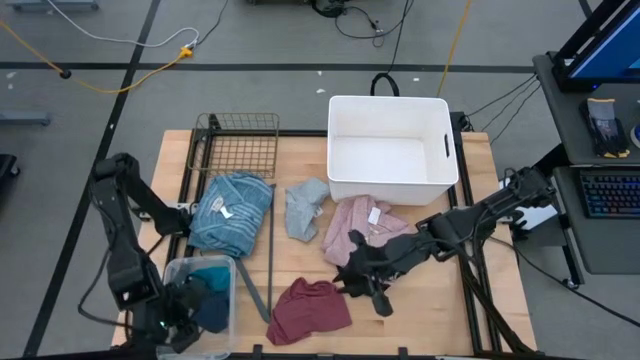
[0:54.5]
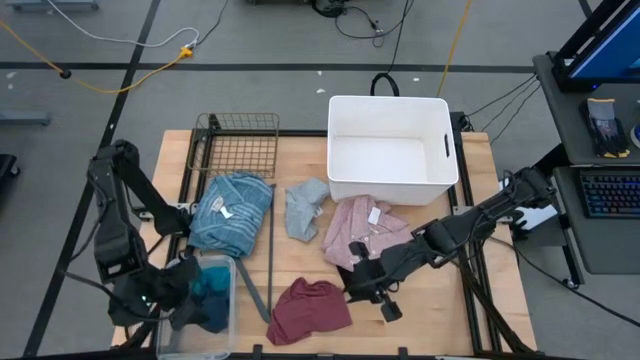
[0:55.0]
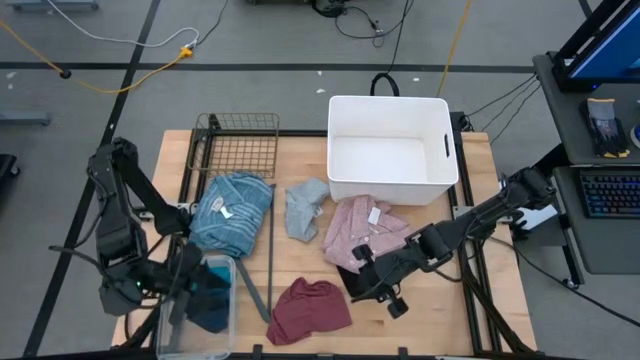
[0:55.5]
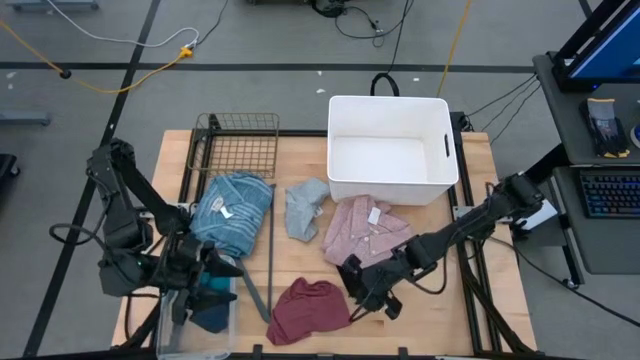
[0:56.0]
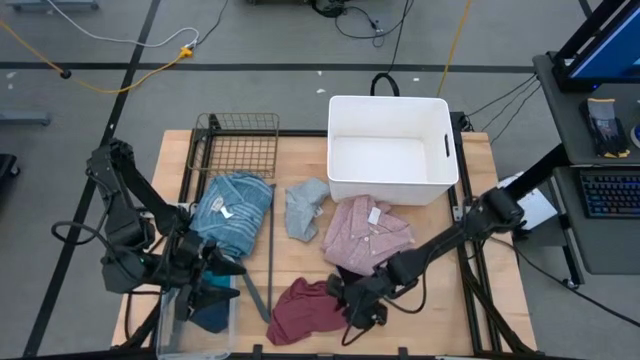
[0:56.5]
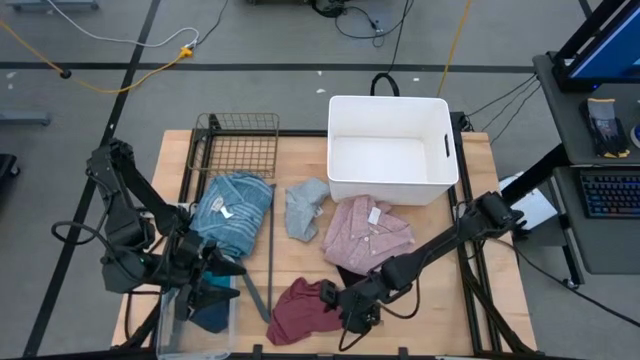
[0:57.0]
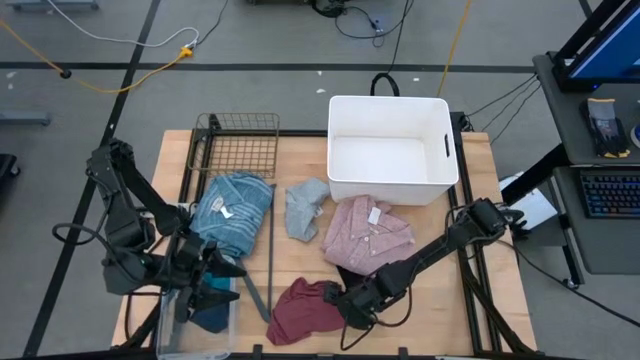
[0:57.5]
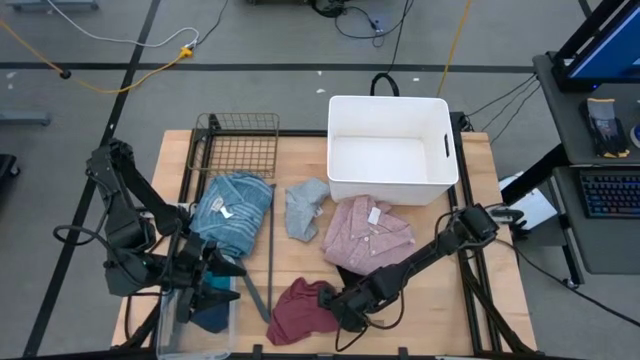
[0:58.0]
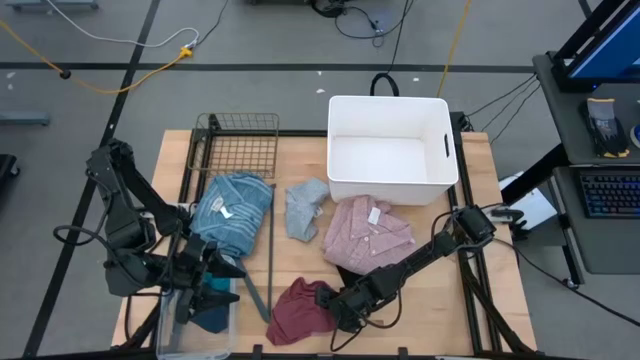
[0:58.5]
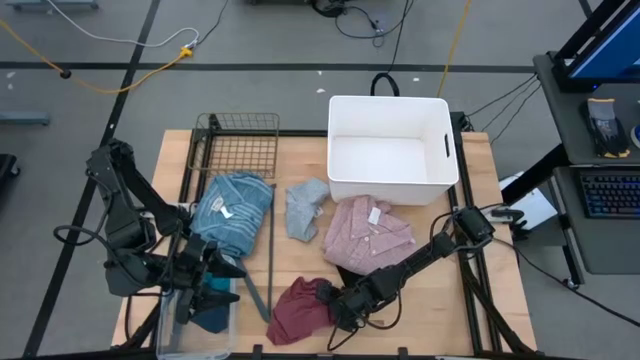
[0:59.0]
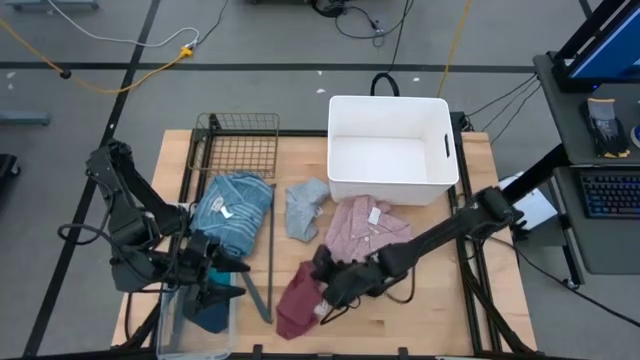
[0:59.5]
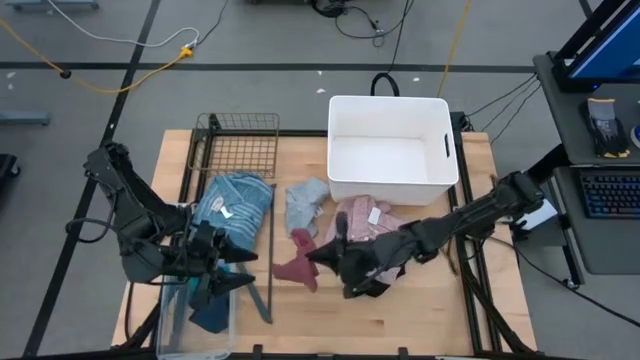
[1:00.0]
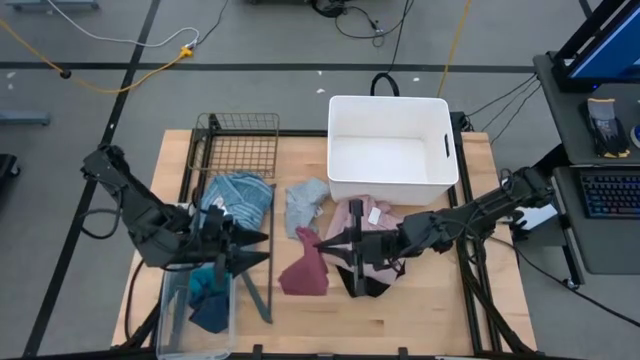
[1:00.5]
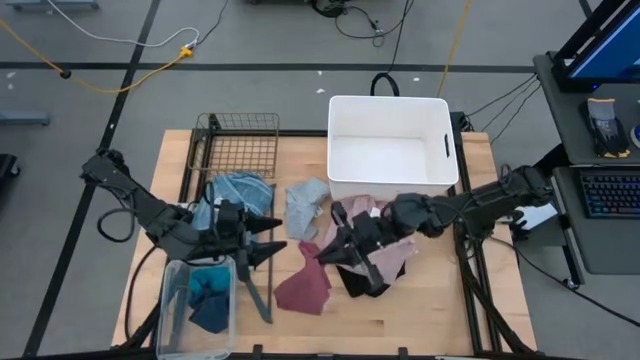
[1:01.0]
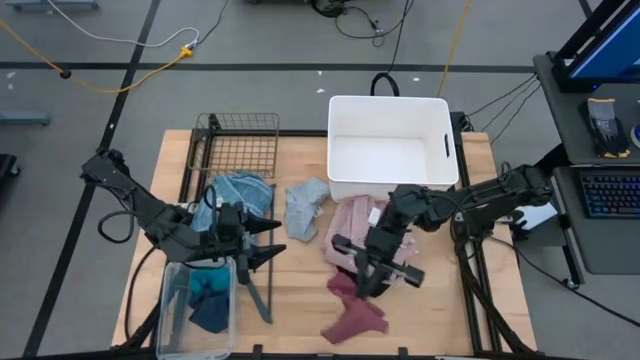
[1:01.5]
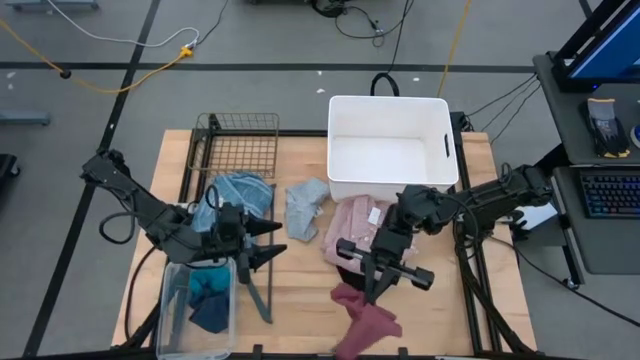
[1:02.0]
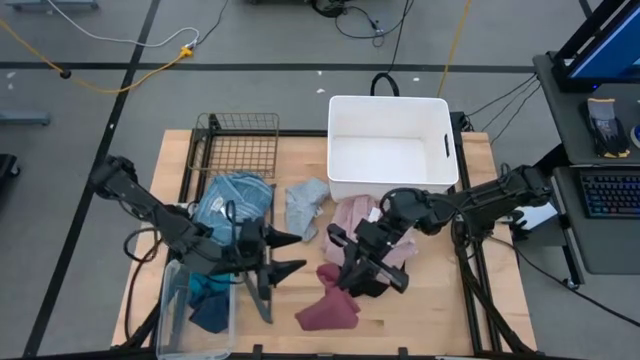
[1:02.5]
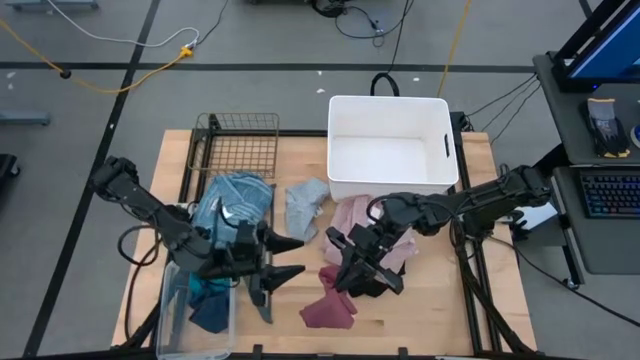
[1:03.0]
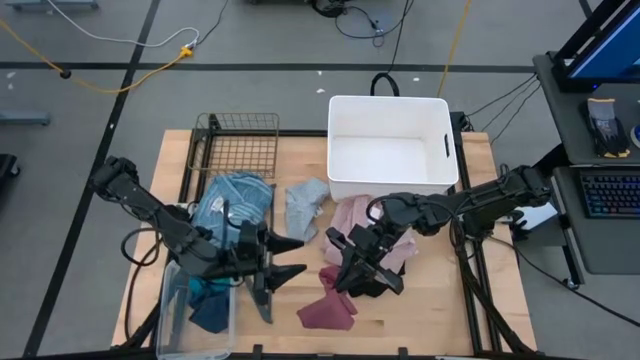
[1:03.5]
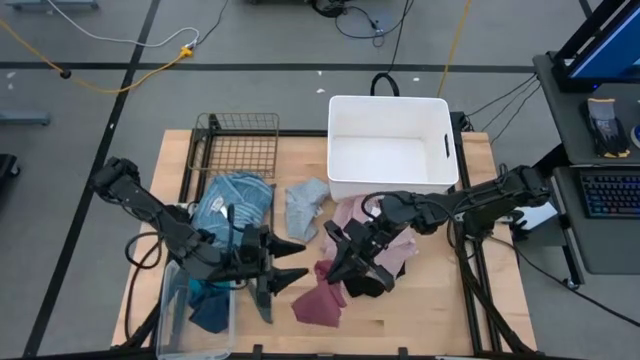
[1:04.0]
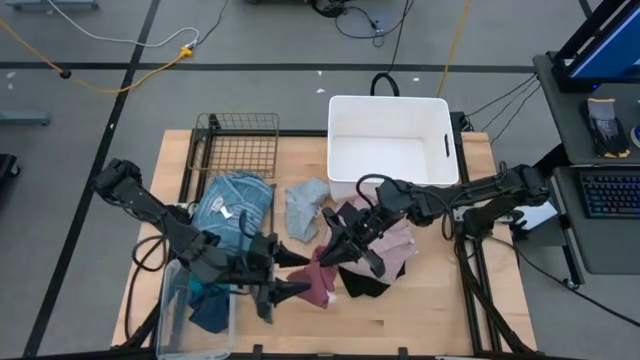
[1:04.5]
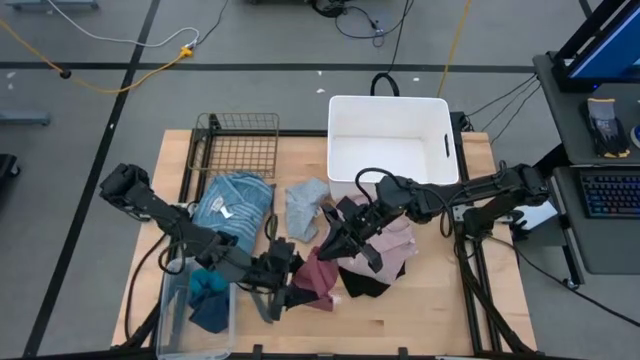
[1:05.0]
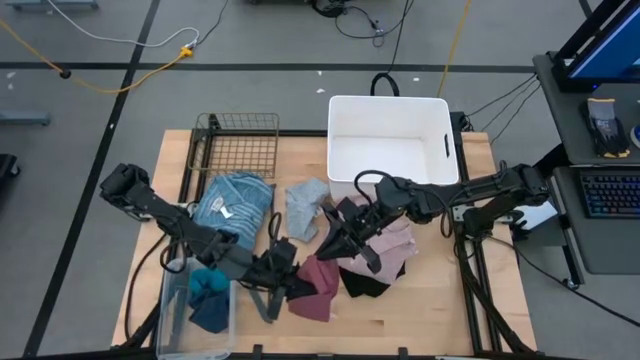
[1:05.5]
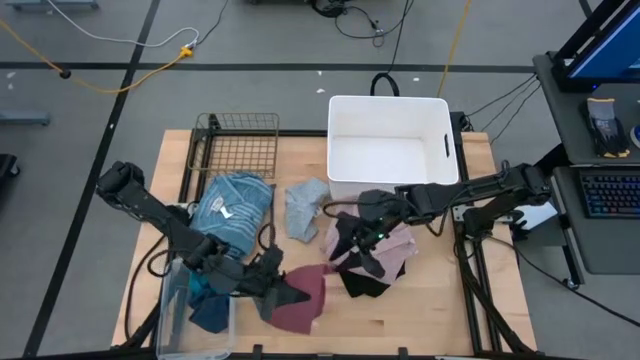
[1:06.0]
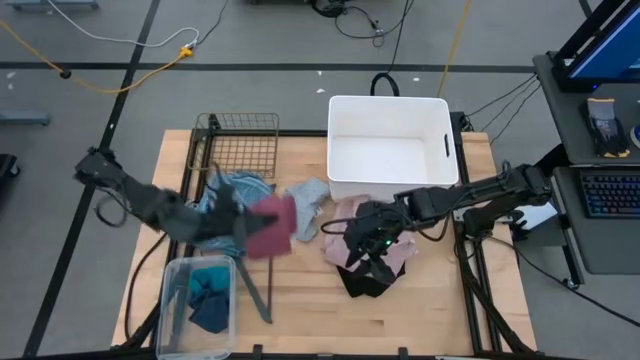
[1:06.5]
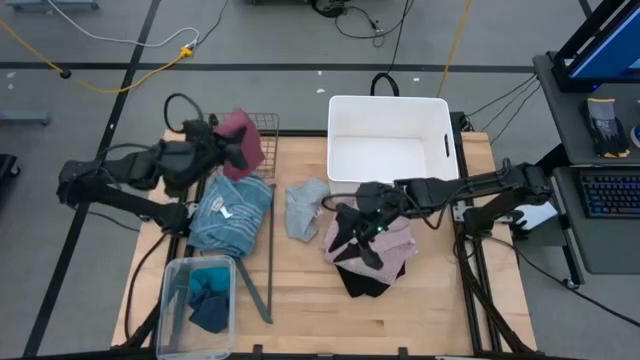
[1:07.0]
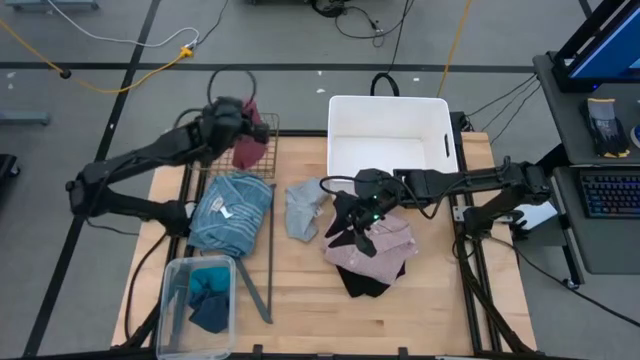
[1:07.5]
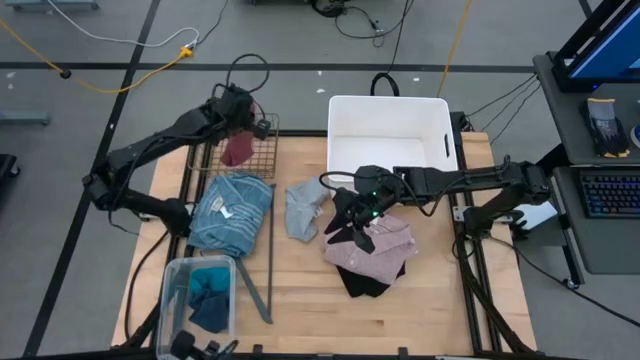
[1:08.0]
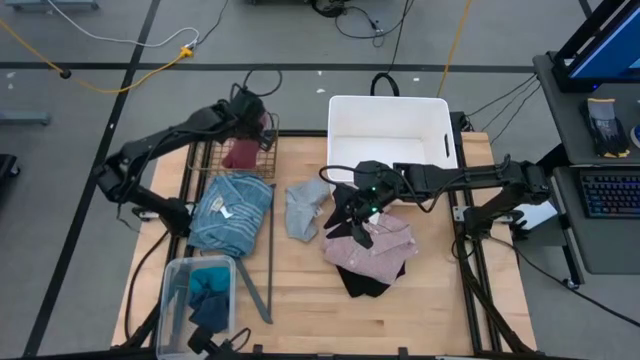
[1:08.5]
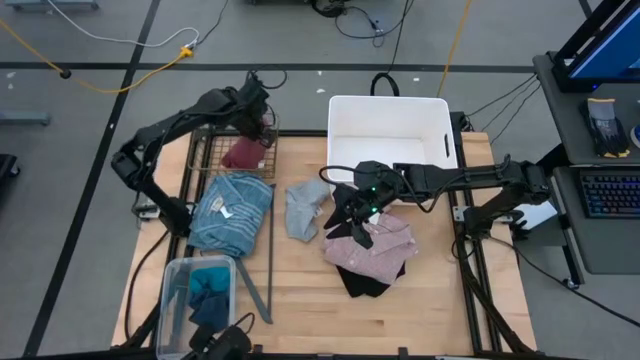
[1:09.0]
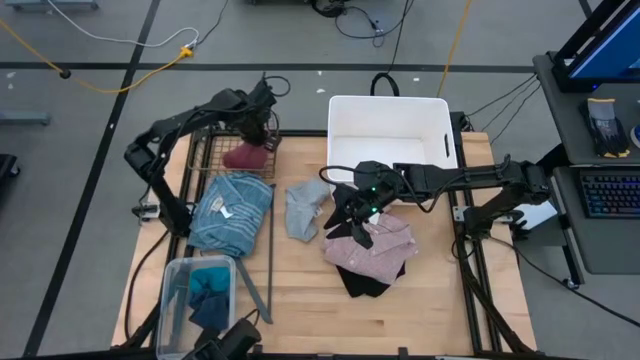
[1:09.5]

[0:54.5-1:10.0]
Task: Pick & Place Cloths
Put the pink shorts into the black wire basket

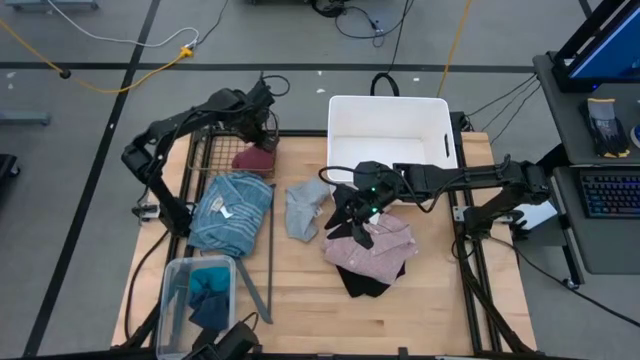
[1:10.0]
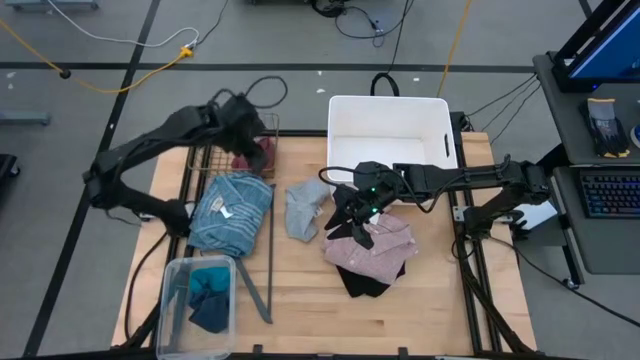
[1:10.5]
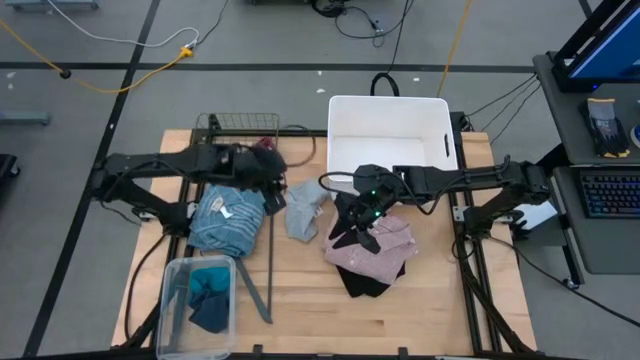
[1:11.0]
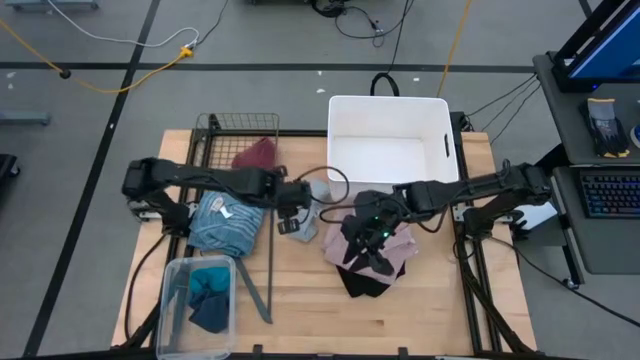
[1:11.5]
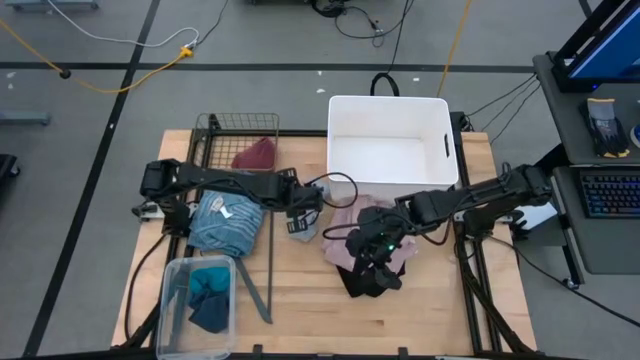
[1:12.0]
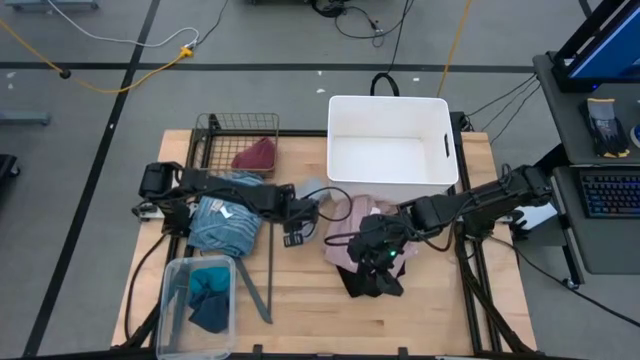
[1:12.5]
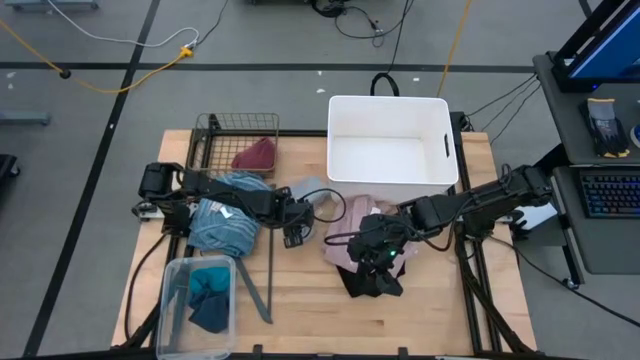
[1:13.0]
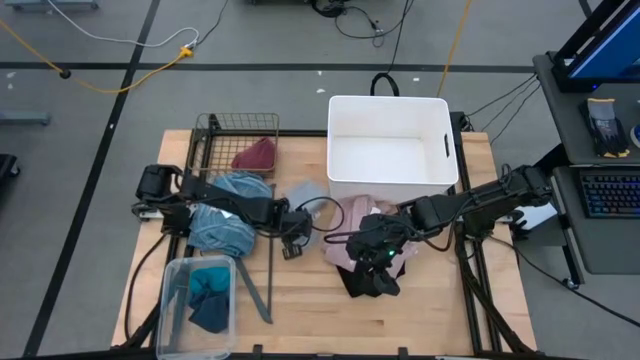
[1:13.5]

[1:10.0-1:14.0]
Put the gray shorts into the black wire basket

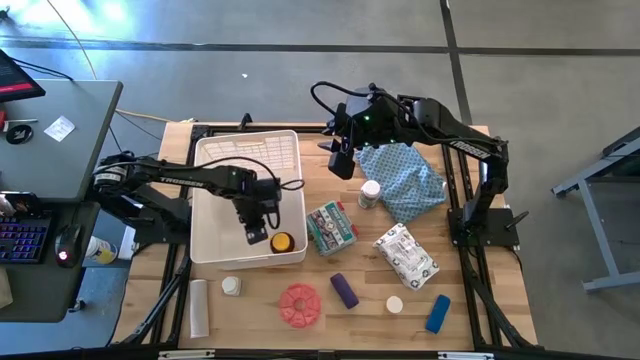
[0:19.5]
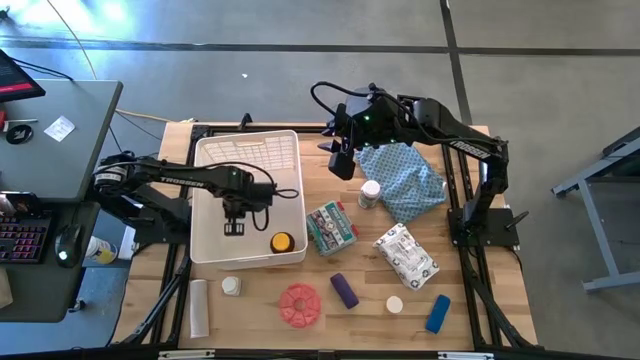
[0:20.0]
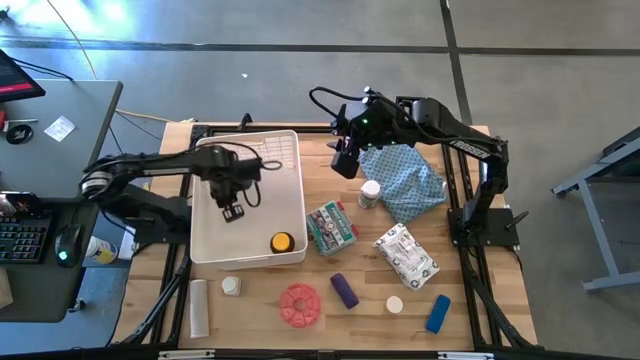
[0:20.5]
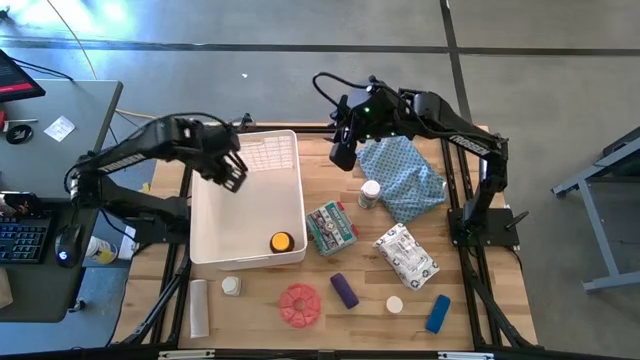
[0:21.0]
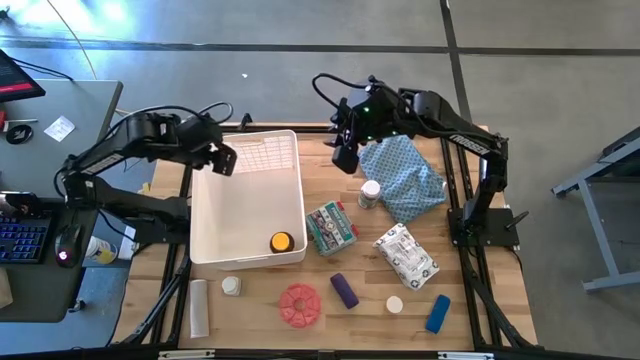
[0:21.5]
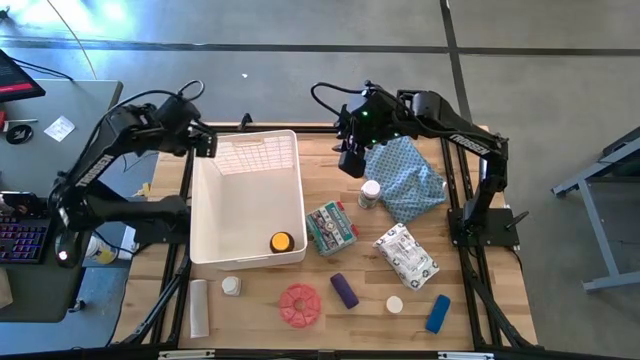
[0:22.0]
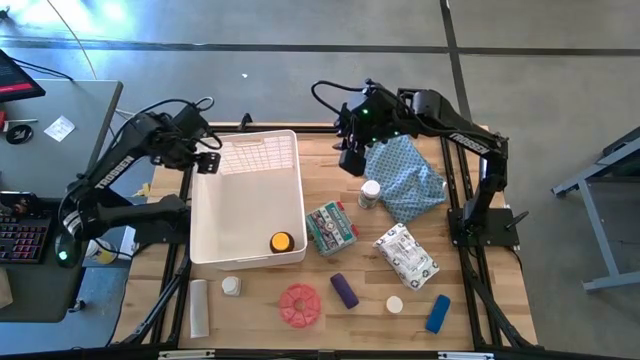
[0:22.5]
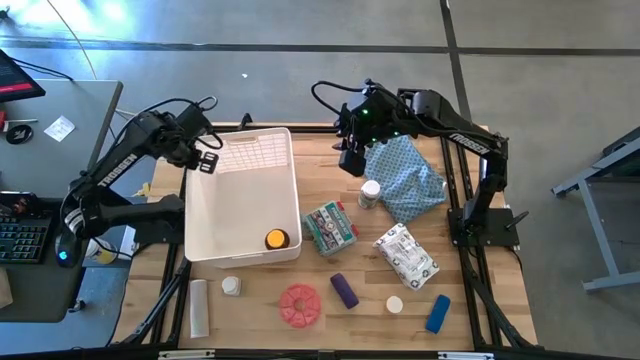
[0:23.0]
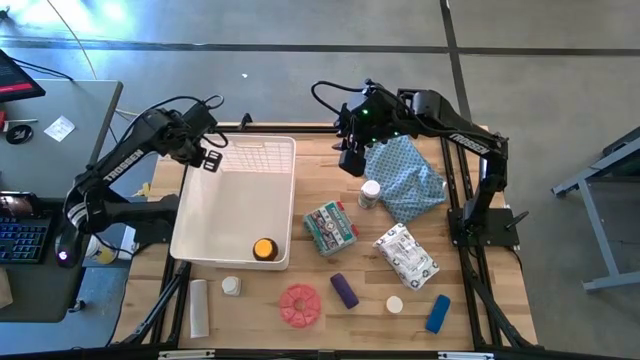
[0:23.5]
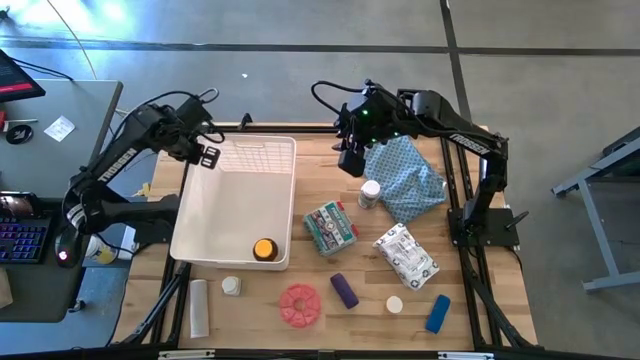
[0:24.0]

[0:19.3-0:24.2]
Task: Pick & place medical supplies in basket/bin
Adjust the white bin
